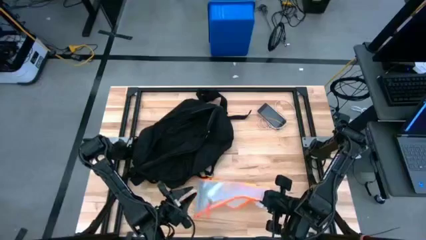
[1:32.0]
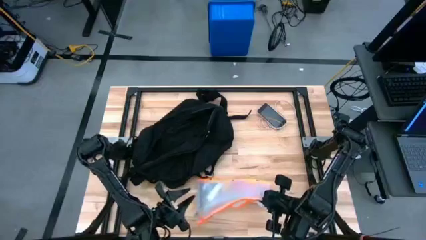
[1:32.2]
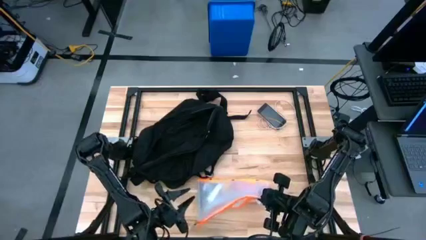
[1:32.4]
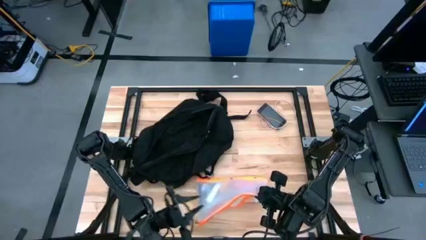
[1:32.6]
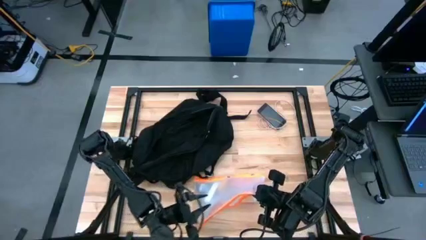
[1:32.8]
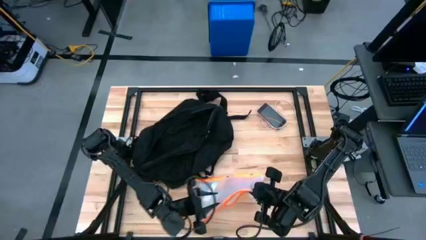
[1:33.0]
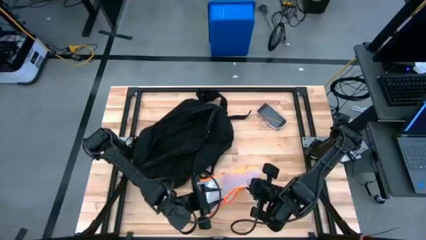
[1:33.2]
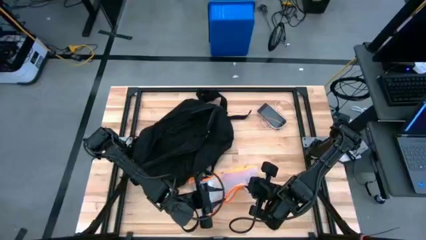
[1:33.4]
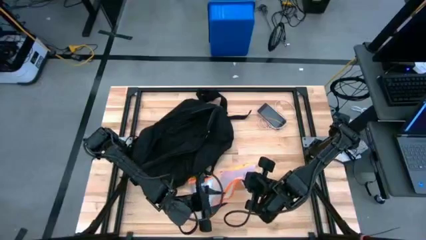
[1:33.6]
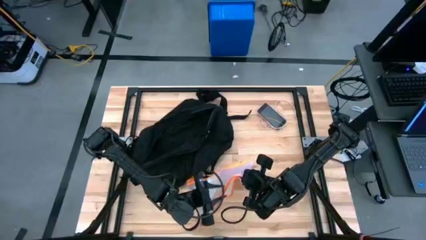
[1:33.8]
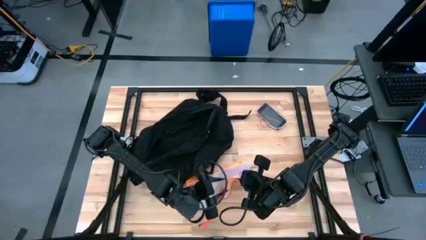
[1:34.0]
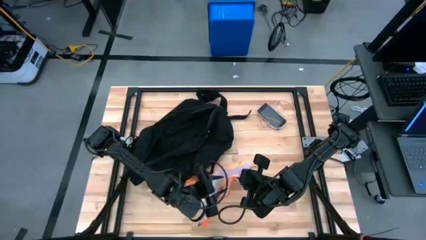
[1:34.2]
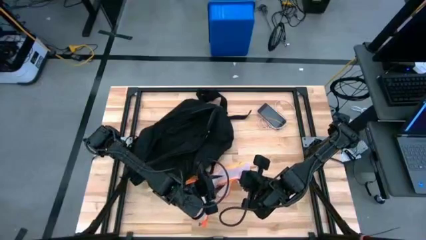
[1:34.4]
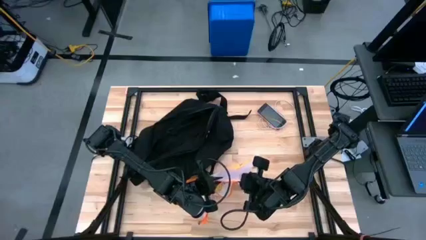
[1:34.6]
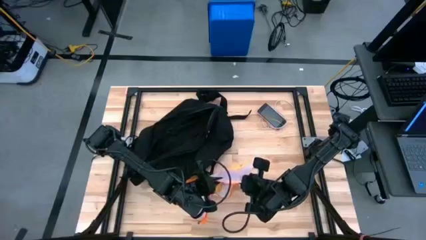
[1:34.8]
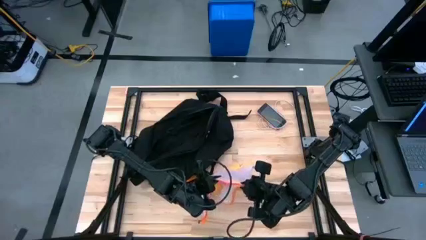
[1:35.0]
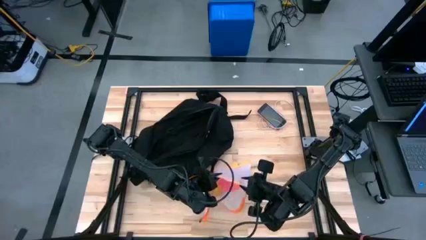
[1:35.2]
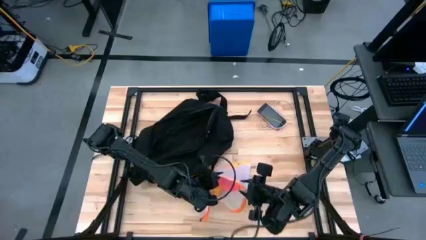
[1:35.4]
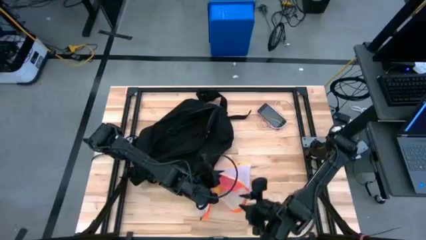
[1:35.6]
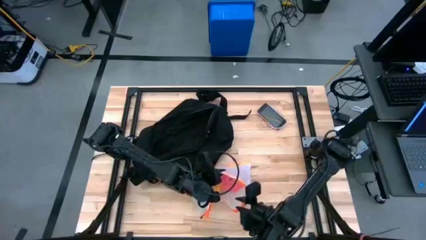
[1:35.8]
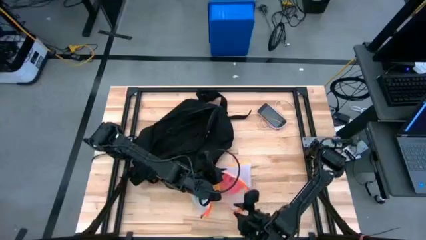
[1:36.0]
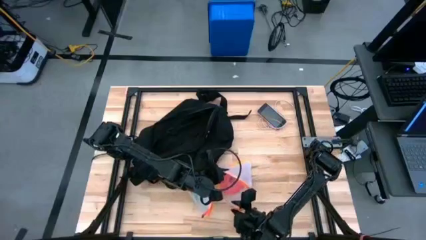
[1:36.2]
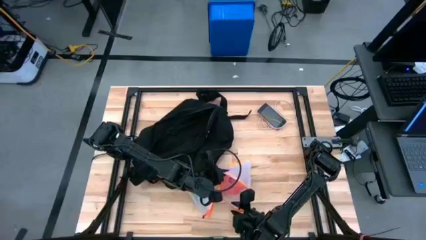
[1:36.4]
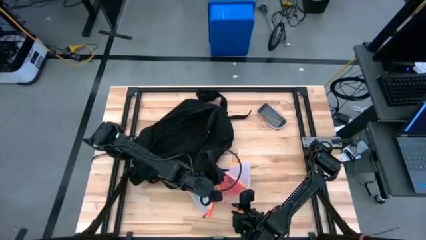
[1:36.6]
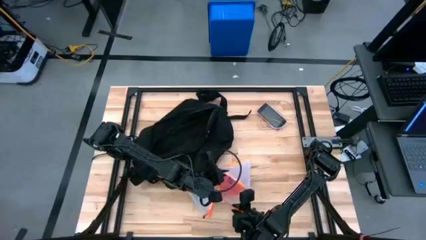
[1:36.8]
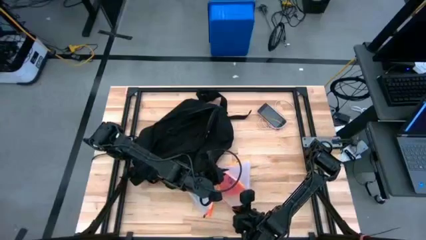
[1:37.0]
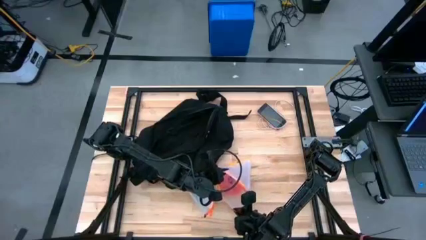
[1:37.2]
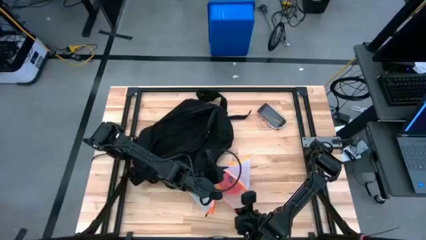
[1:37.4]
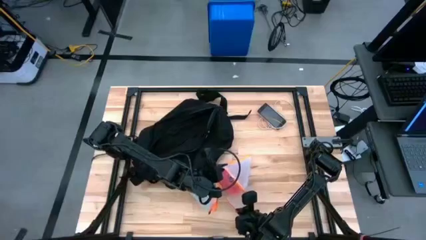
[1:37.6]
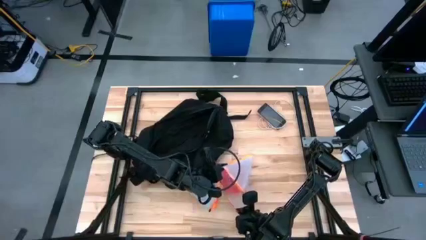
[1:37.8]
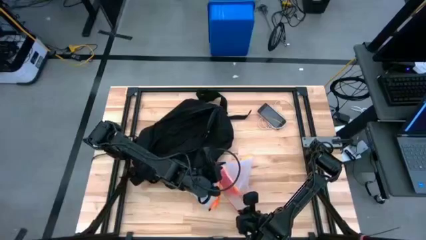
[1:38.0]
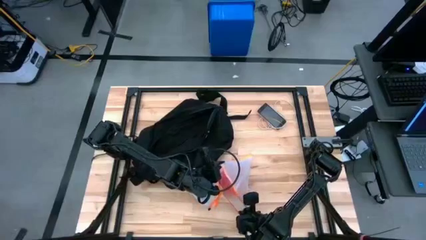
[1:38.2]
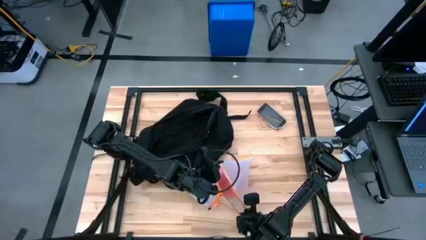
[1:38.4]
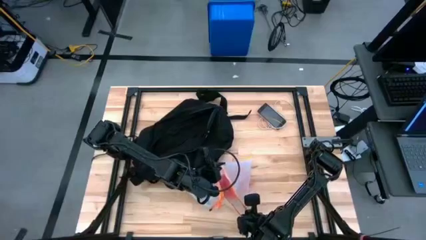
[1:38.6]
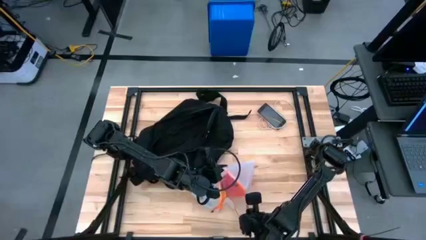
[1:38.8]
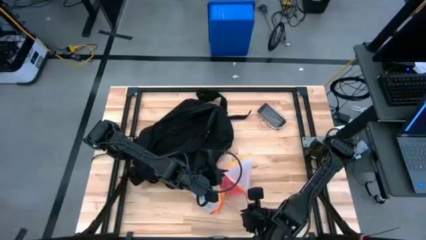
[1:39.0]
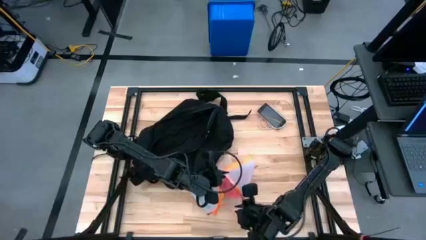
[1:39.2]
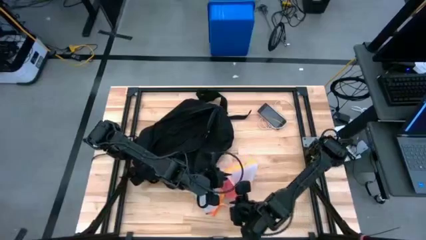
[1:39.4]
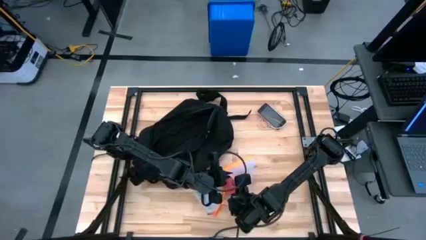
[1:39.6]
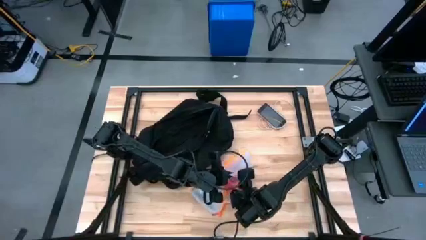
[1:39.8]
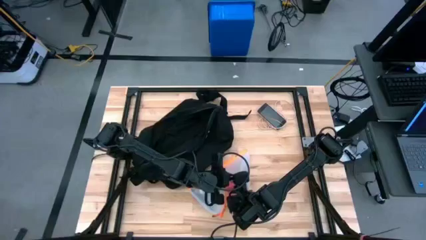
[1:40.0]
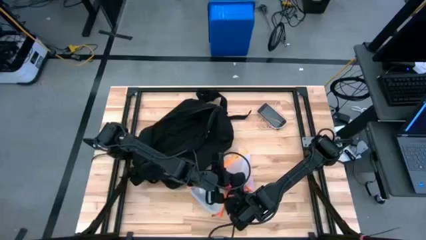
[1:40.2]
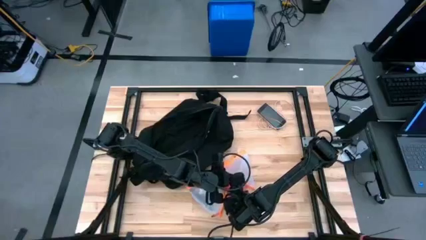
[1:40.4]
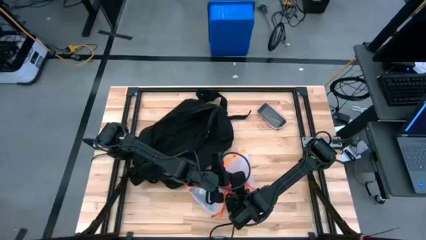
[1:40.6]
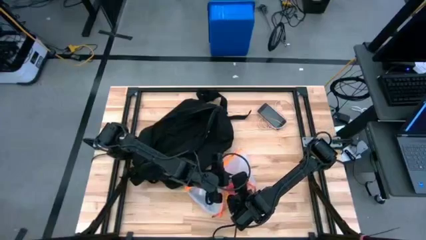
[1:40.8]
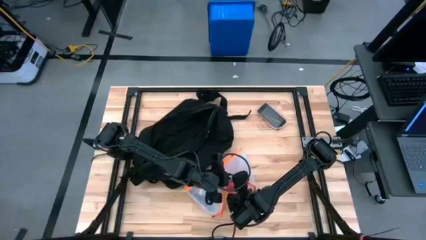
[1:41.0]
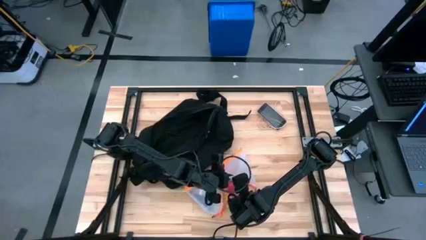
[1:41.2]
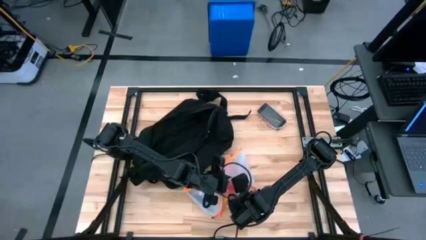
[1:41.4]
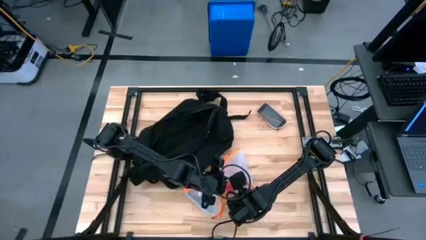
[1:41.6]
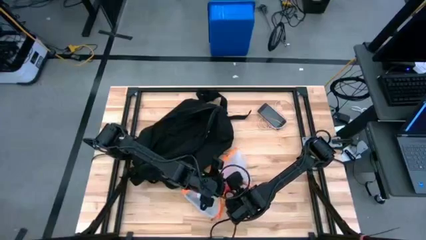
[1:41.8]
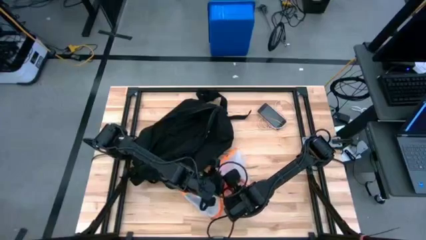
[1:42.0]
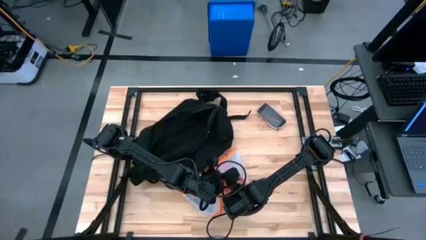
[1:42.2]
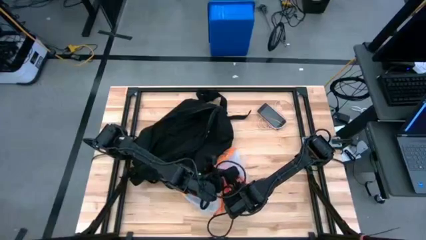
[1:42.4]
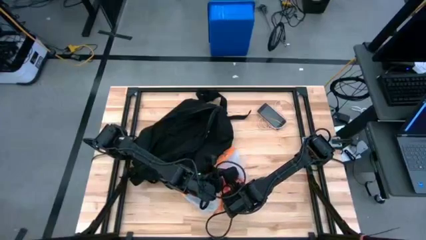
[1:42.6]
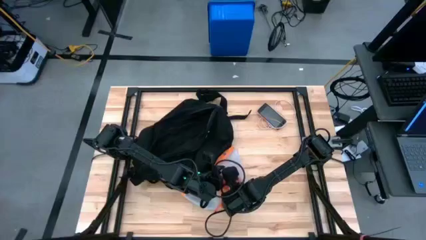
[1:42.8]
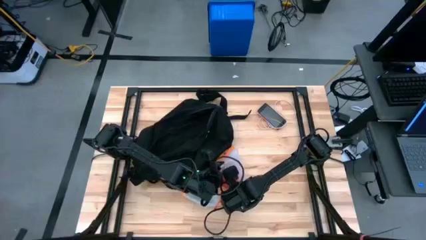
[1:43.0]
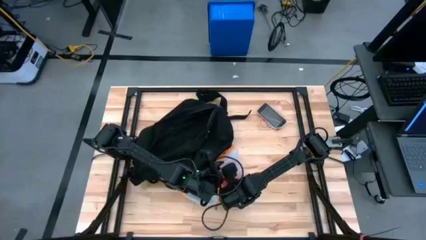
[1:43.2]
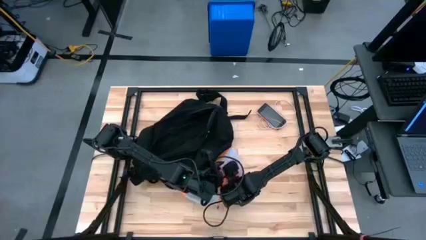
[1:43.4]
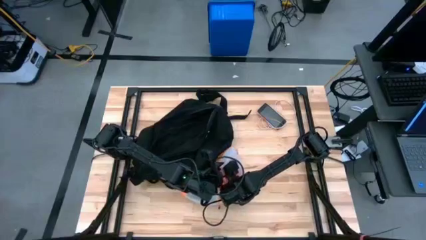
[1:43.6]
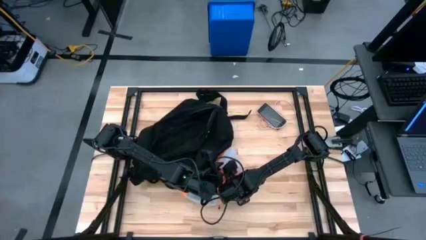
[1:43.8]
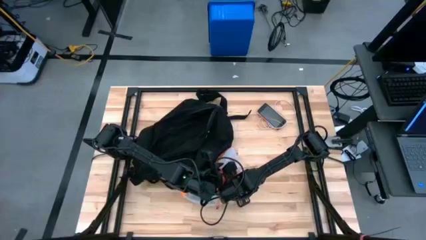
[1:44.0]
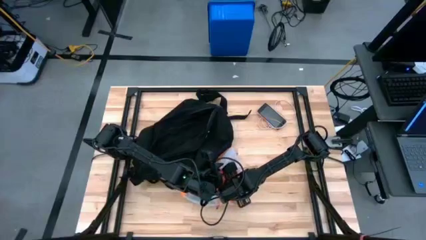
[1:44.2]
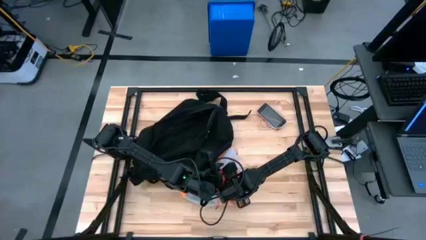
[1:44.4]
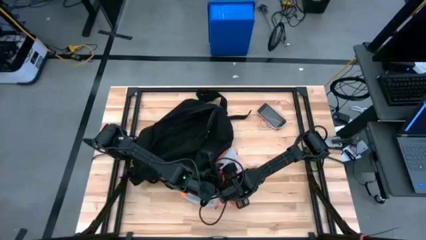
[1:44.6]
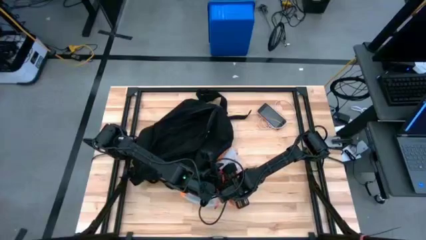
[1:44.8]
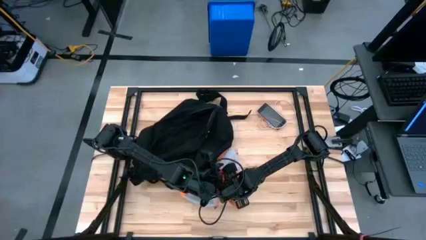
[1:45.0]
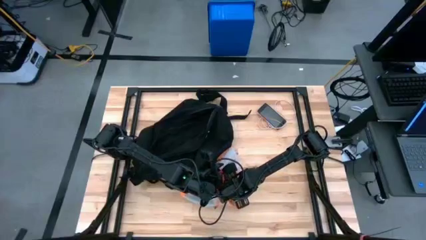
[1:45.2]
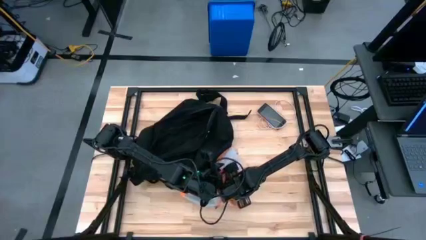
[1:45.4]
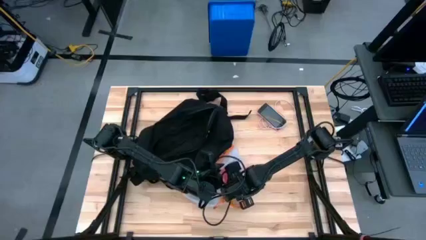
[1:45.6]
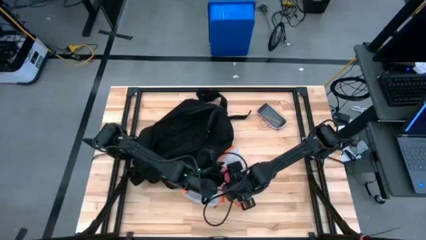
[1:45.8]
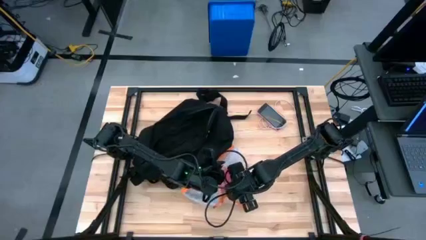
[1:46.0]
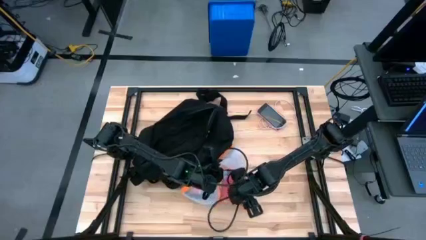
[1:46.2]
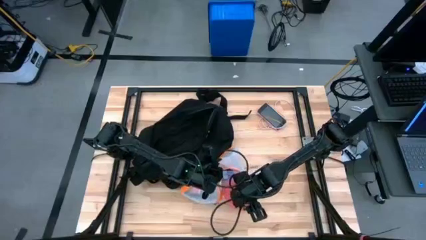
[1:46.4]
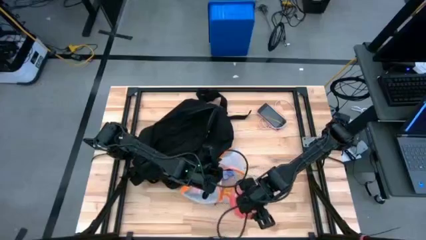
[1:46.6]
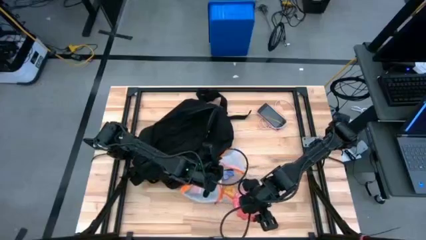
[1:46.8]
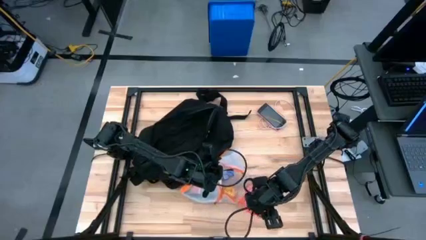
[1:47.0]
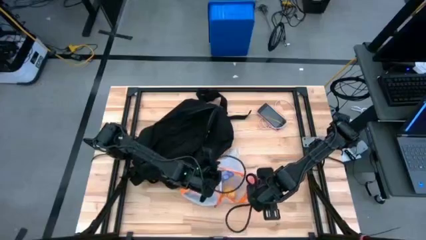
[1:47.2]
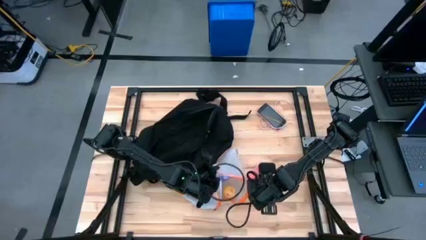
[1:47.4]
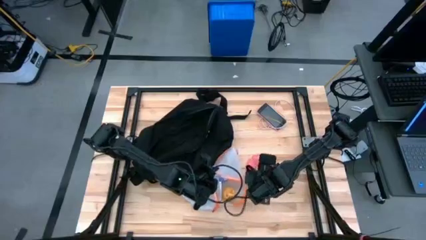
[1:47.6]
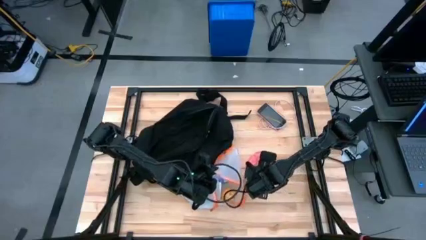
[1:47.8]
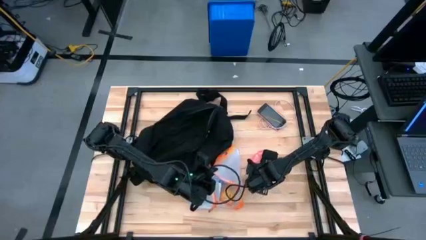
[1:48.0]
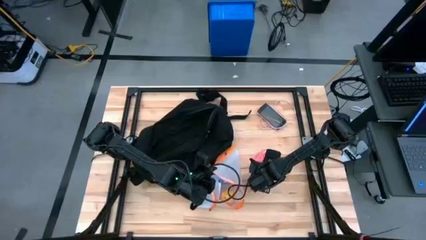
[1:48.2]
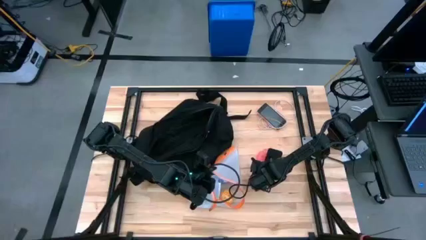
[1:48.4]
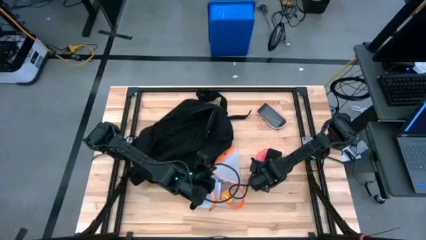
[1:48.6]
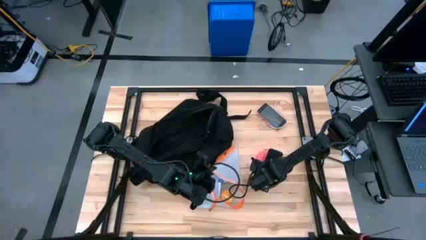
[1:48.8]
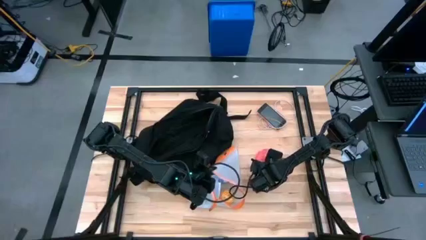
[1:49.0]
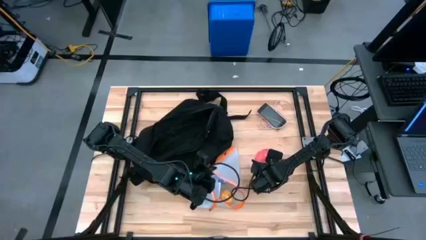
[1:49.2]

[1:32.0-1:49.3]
Task: Unpack backpack
Remove the pink medicine organizer from the orange zip bag
